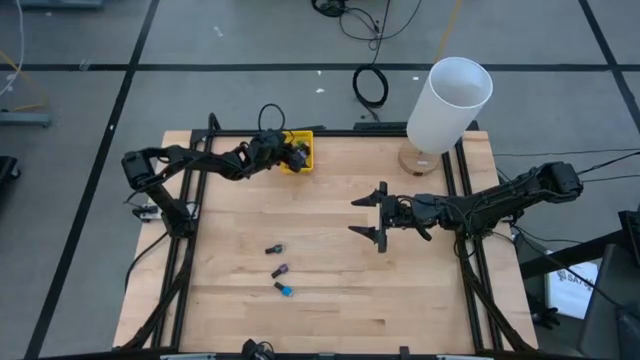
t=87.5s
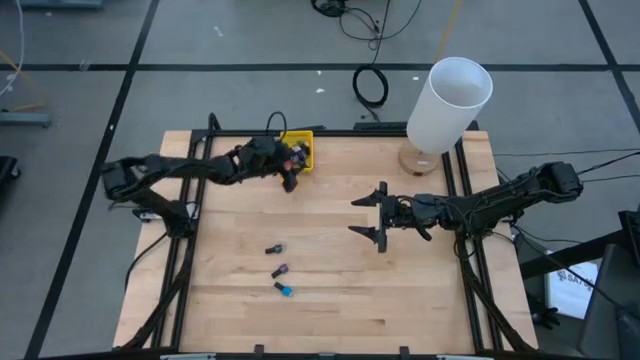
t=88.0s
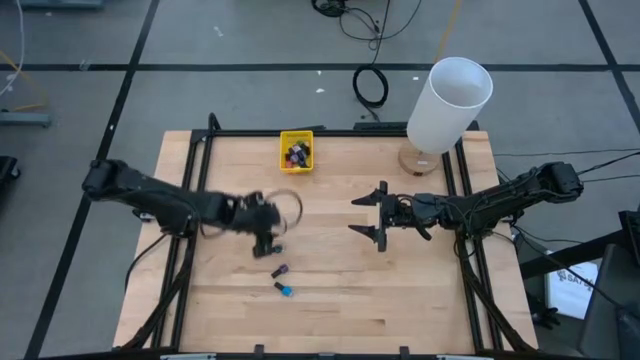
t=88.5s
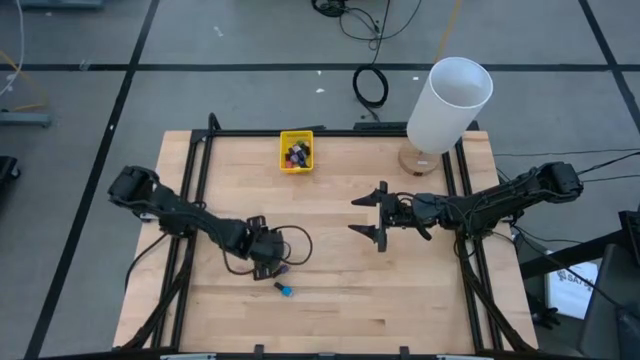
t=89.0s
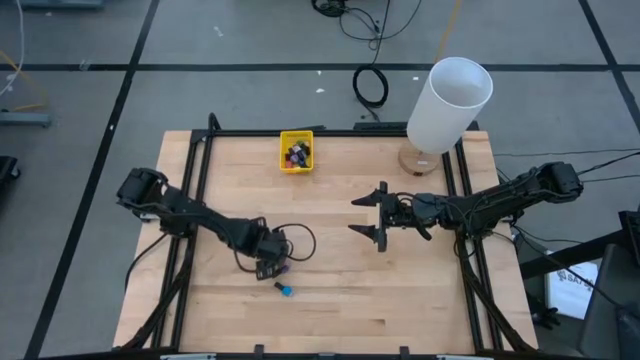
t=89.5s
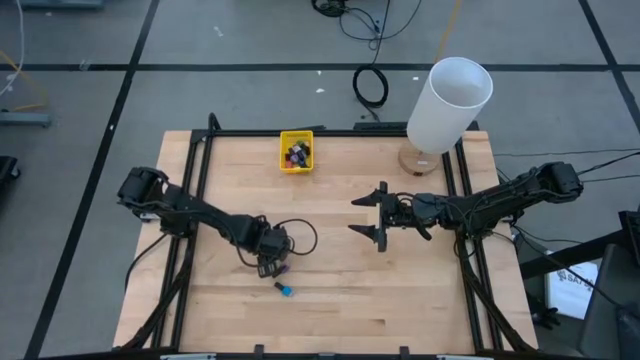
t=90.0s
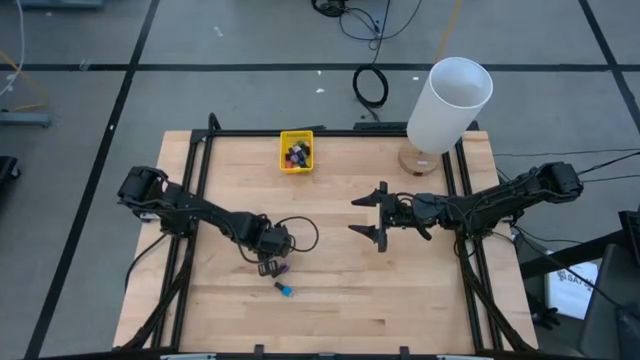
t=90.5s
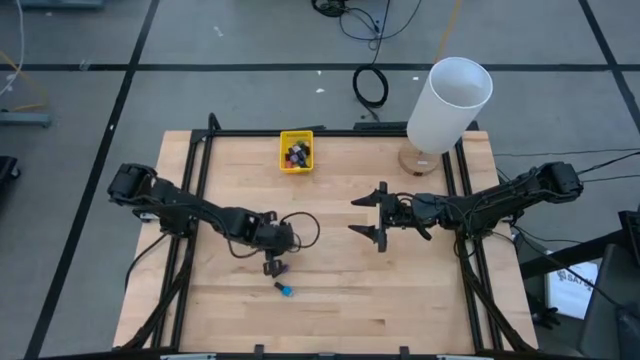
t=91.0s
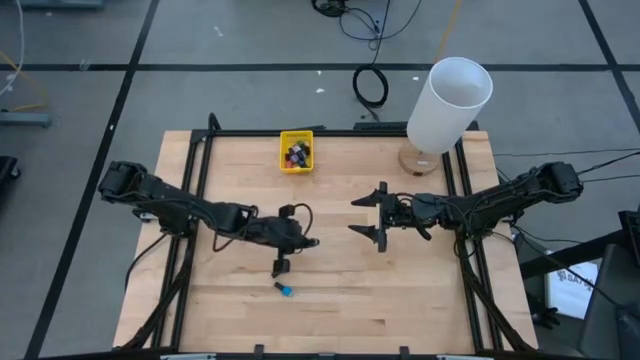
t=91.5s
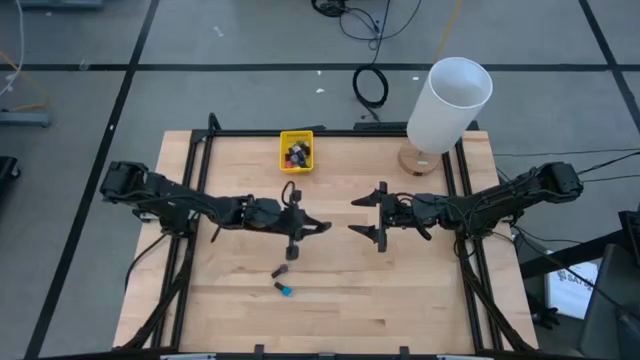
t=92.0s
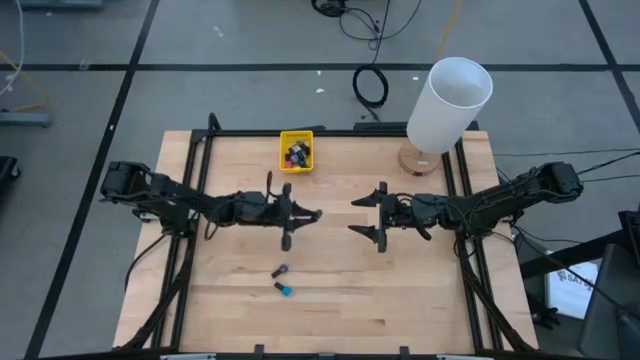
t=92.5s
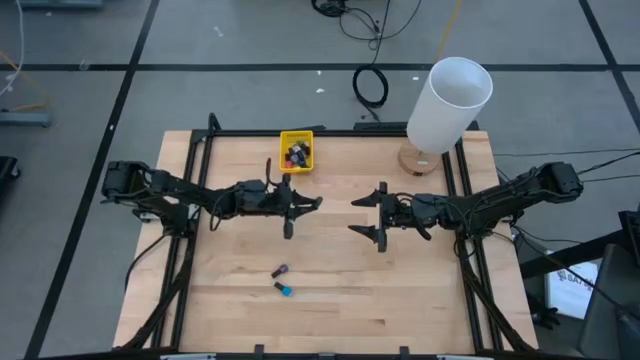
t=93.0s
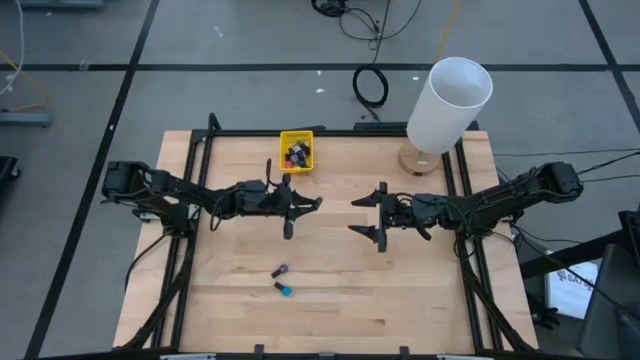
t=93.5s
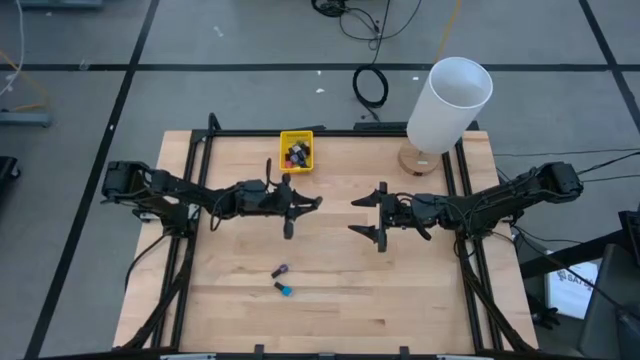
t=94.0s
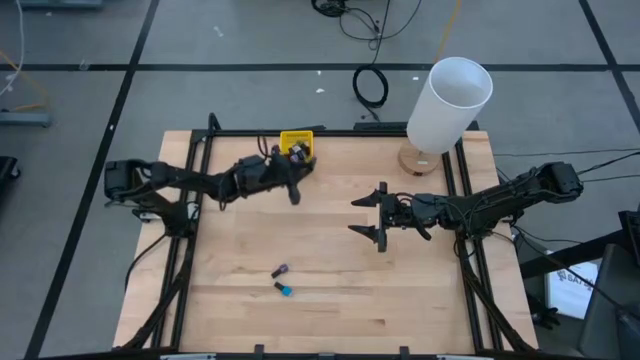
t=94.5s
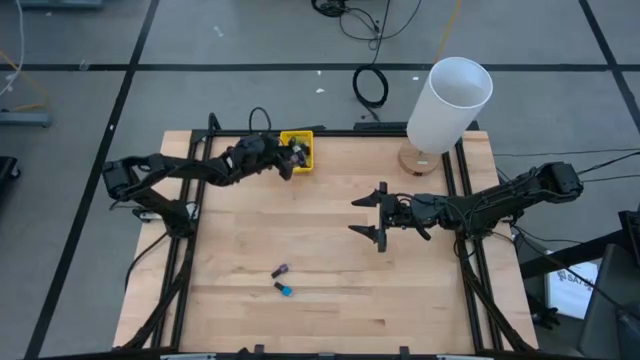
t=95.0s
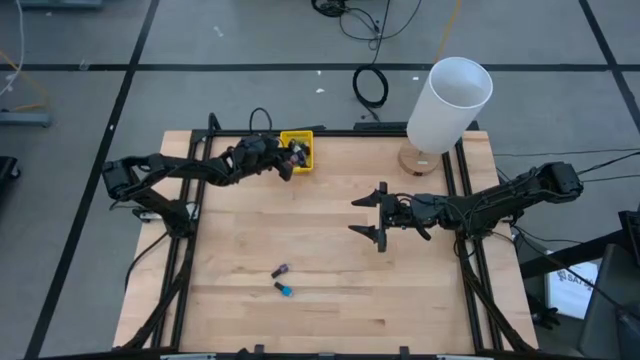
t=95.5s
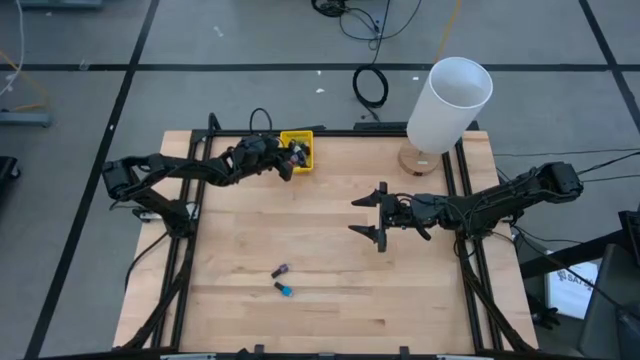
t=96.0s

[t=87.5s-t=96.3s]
Task: Pick & Place Nail Polish
Put the green nail polish bottle into the yellow bin

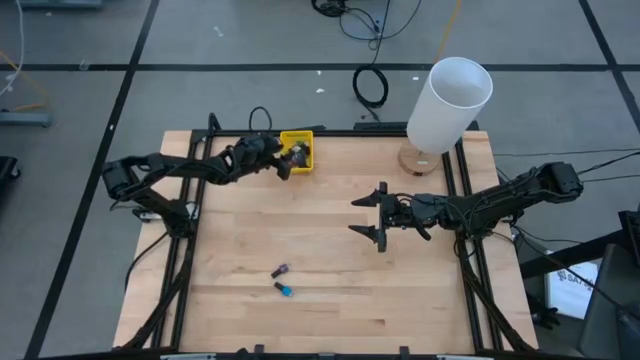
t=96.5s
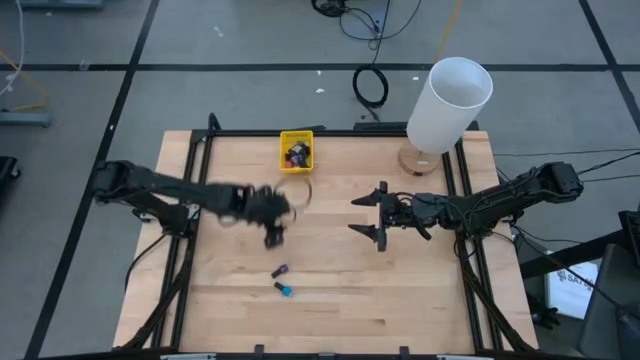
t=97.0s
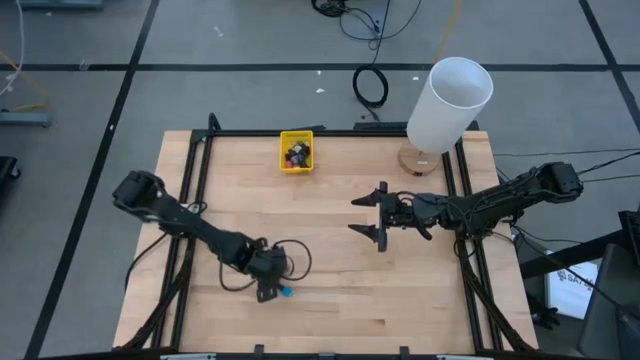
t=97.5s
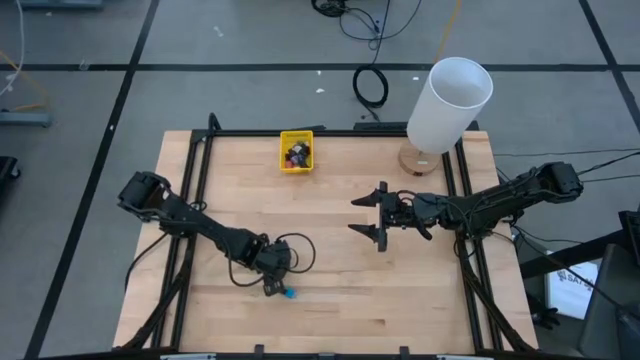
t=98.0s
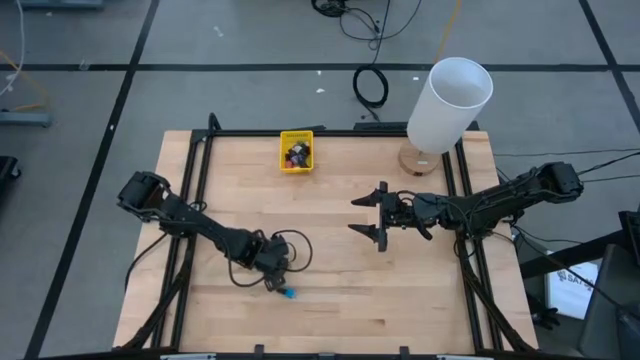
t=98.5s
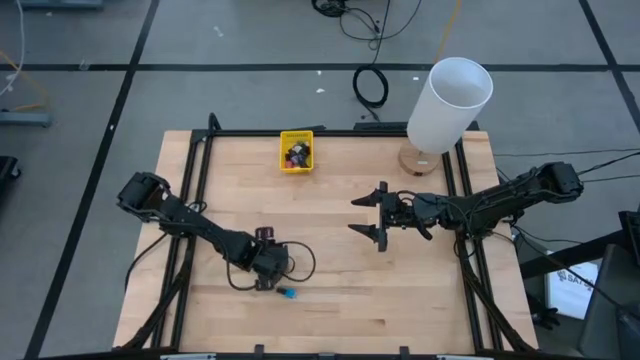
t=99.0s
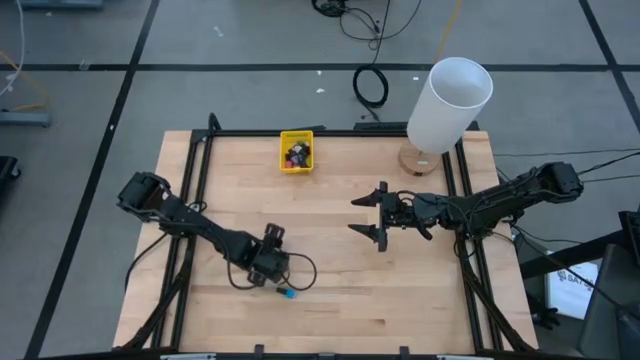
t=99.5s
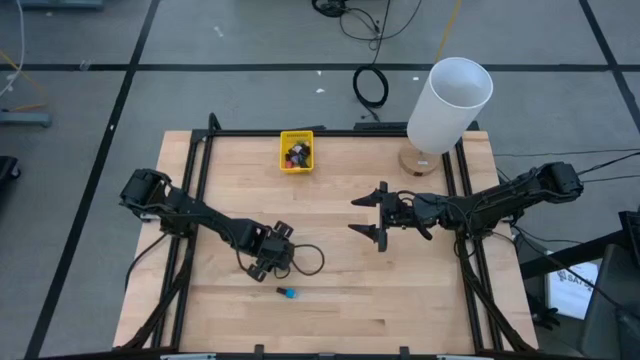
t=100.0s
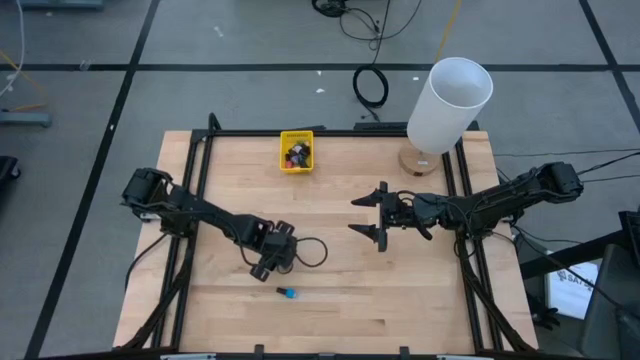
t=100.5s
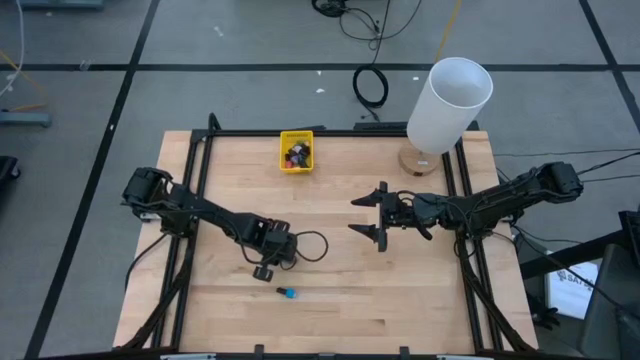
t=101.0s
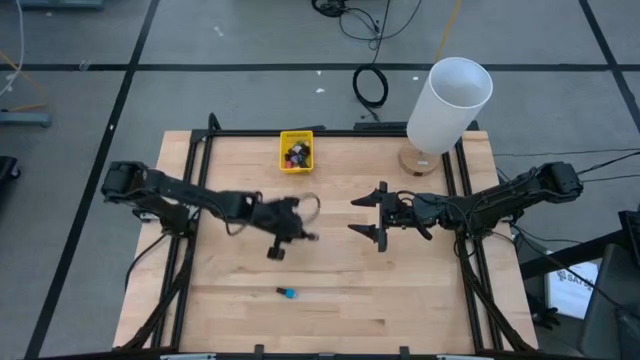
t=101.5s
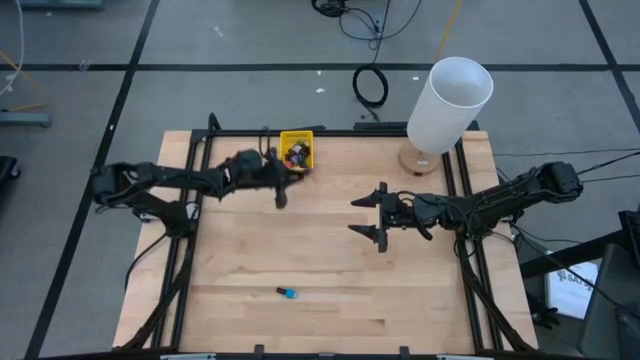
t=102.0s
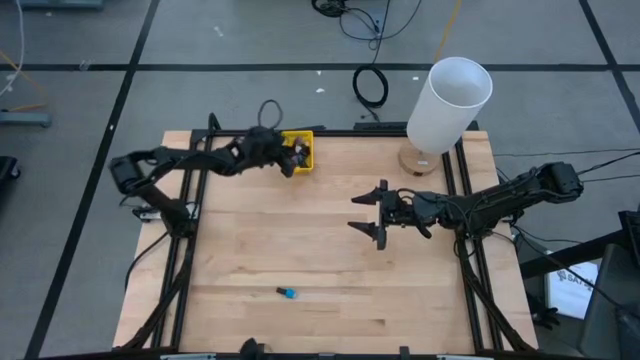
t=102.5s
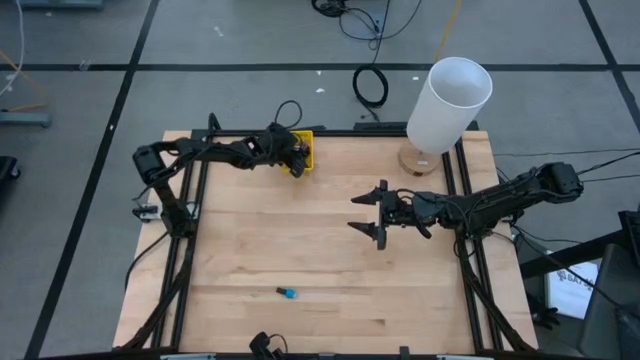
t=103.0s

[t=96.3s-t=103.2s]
Put the violet nail polish bottle into the yellow bin

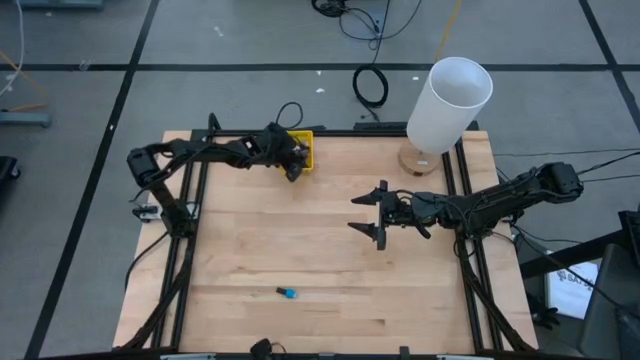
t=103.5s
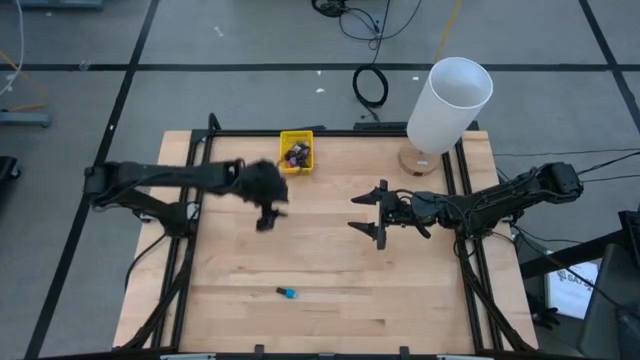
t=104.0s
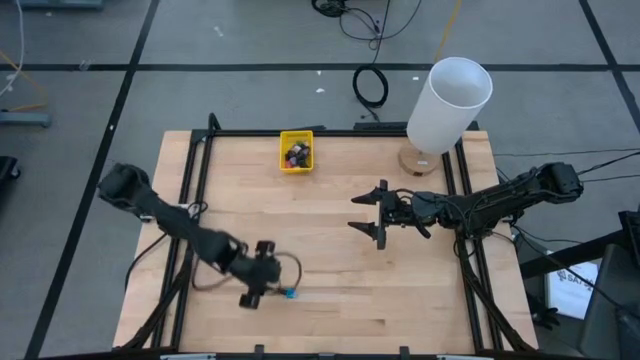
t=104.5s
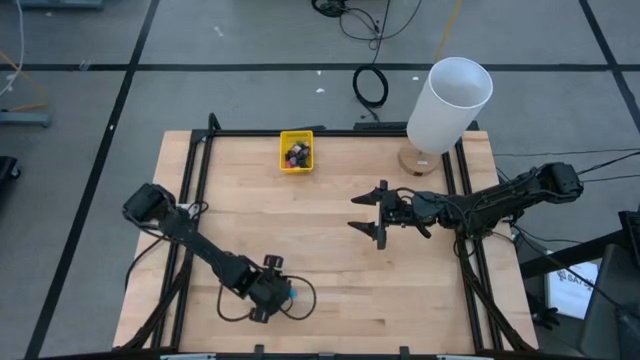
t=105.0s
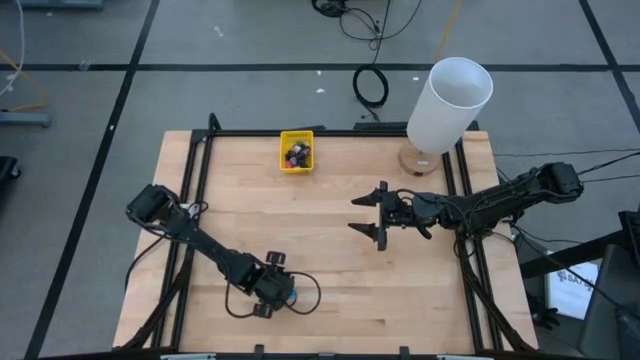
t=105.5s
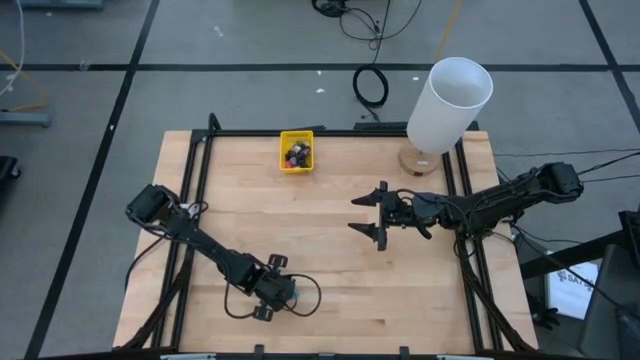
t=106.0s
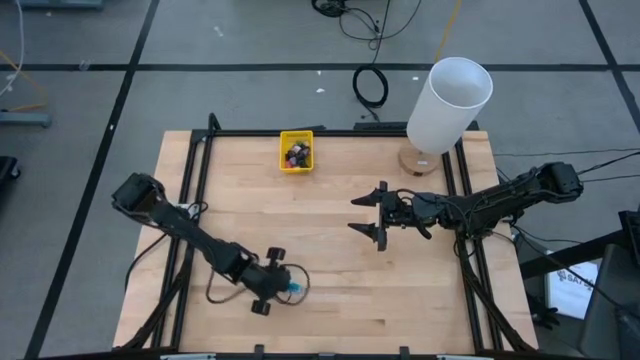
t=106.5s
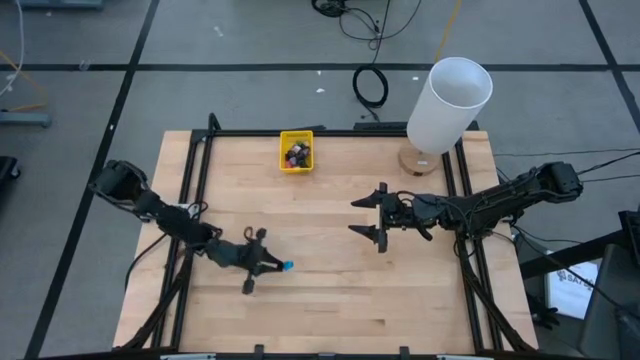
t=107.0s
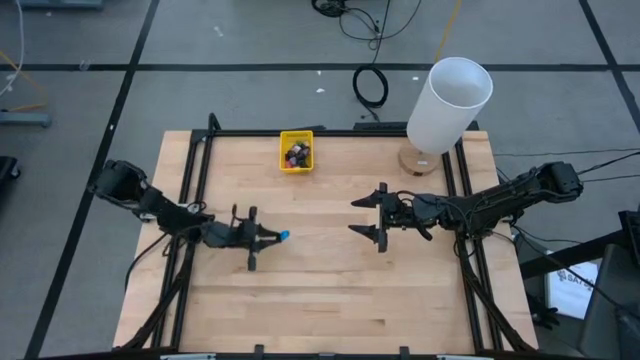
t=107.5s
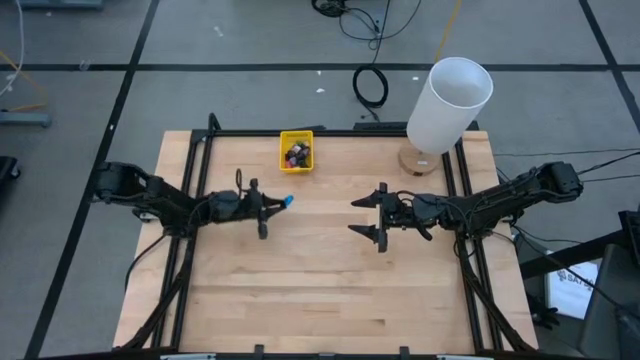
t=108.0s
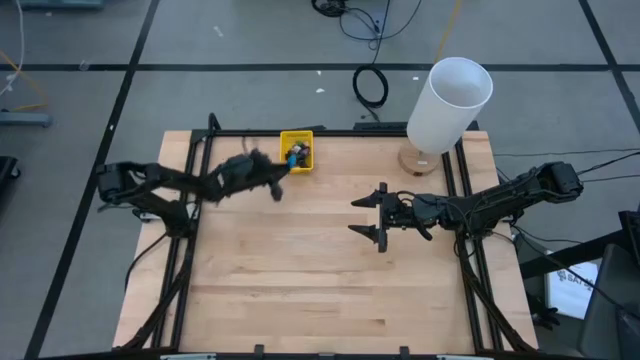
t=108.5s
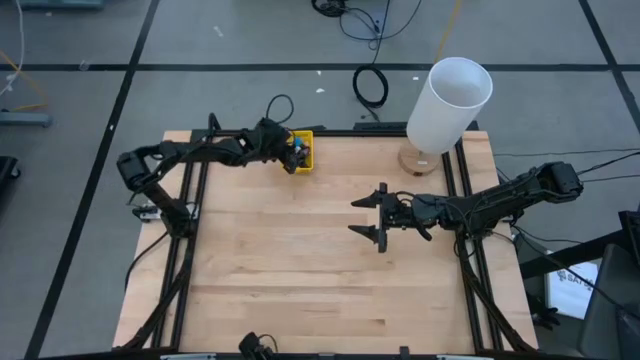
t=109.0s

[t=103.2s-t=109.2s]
Put the blue nail polish bottle into the yellow bin
